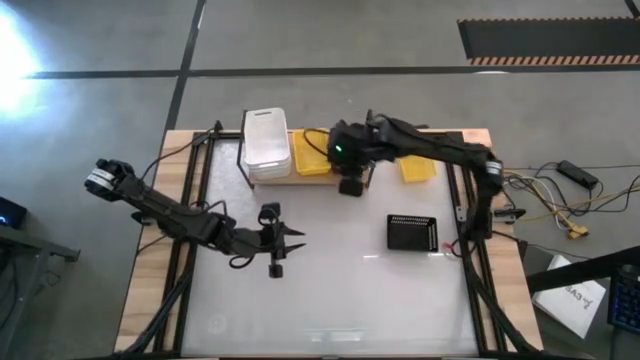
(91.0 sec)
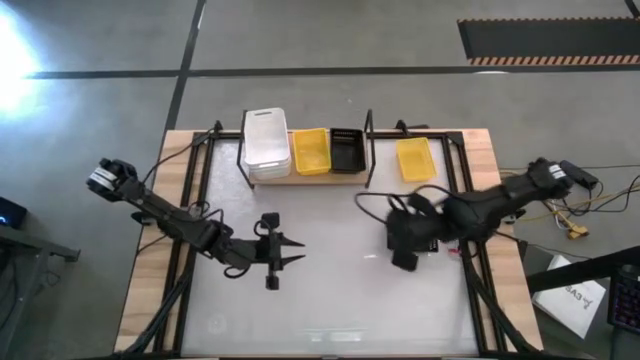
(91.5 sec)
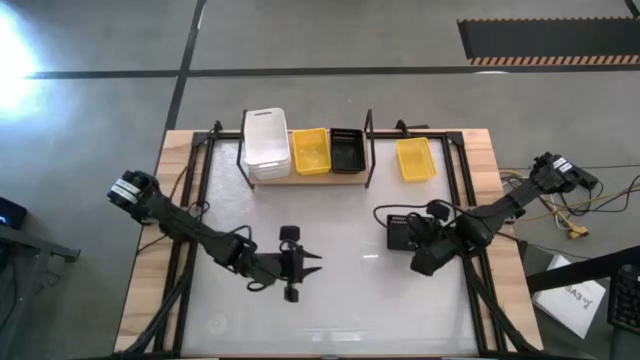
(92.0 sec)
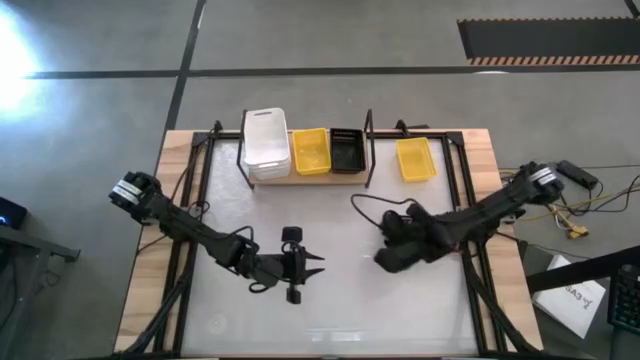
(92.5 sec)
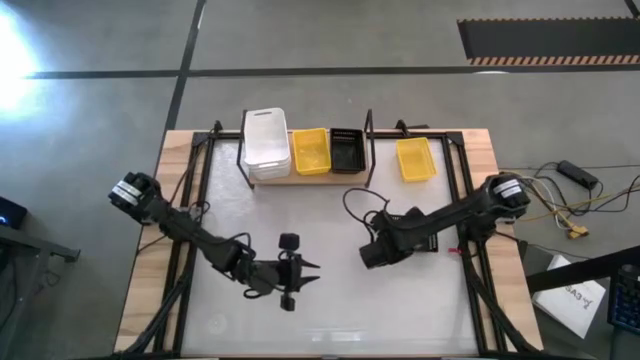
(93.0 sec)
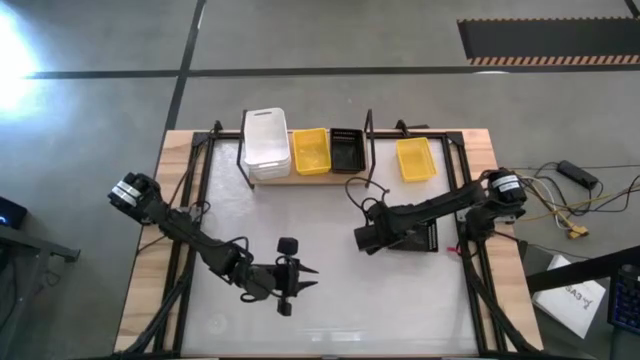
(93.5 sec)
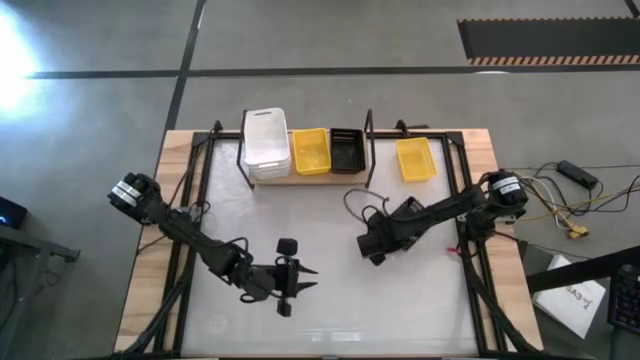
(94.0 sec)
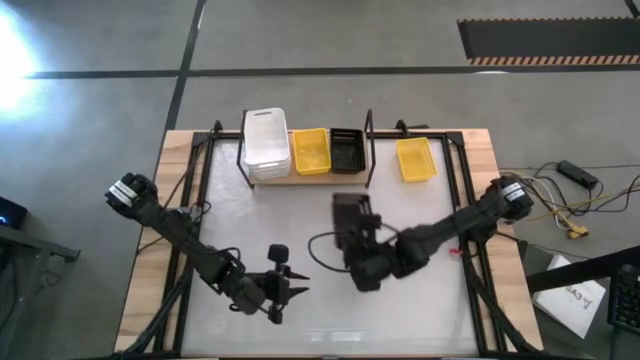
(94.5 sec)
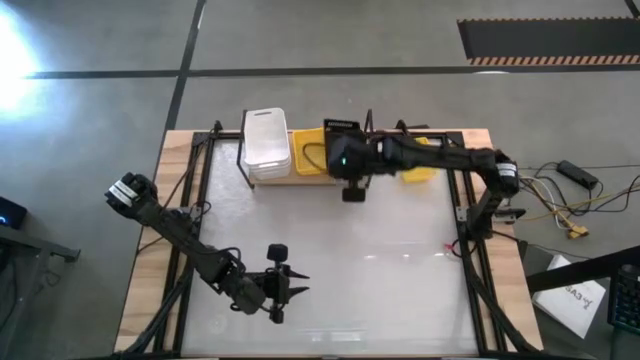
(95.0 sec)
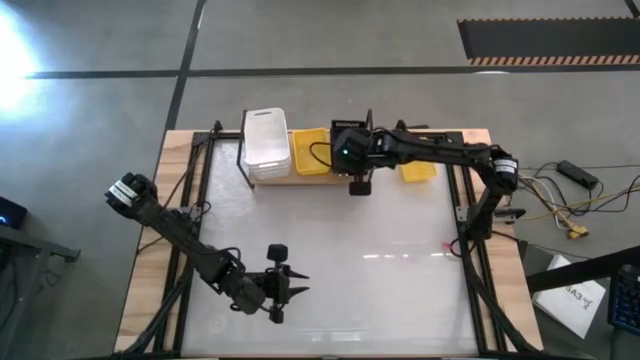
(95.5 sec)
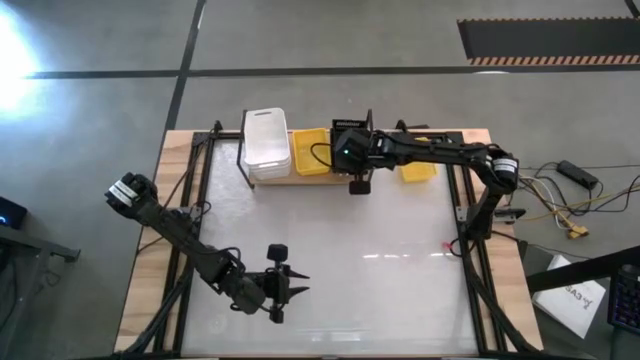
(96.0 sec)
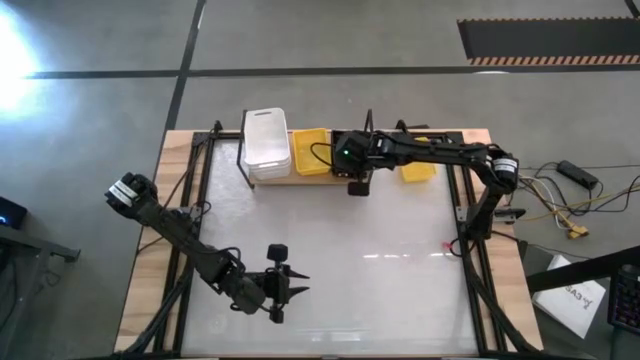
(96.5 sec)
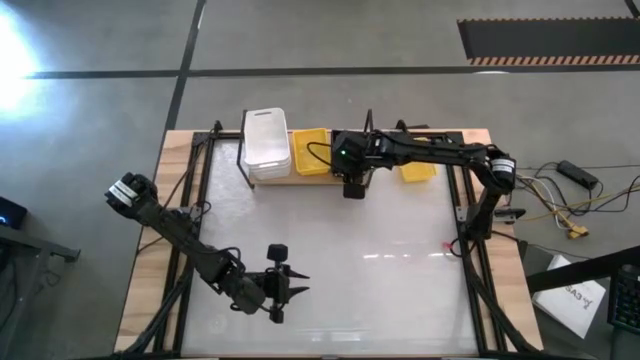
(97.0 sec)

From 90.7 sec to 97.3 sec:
Task: Stack baskets on shelf by color
Stack the black bin on top of the black bin on the shelf

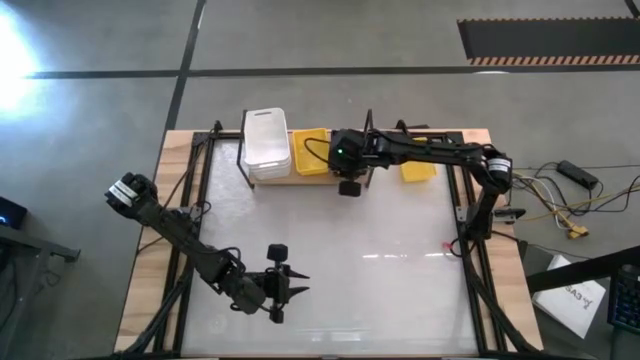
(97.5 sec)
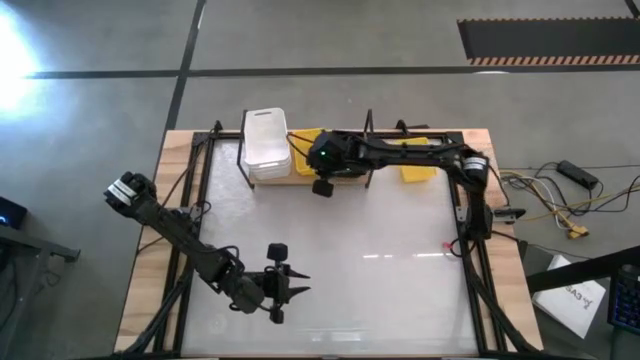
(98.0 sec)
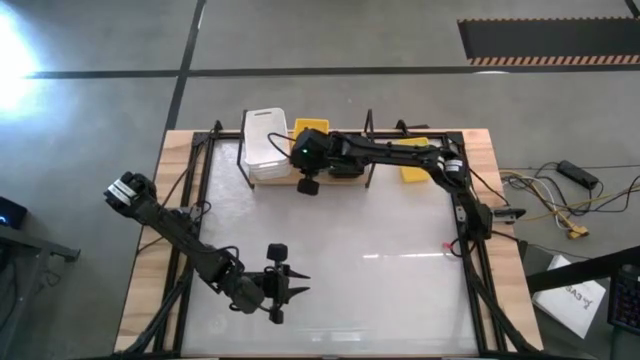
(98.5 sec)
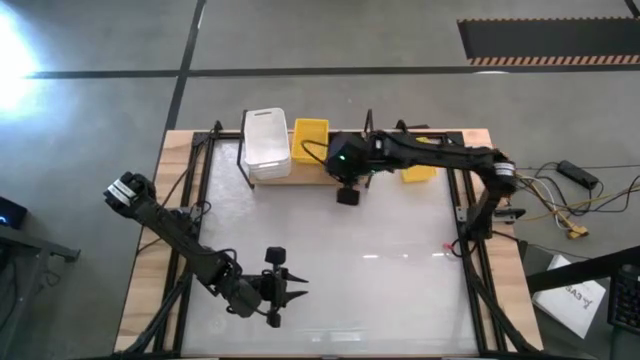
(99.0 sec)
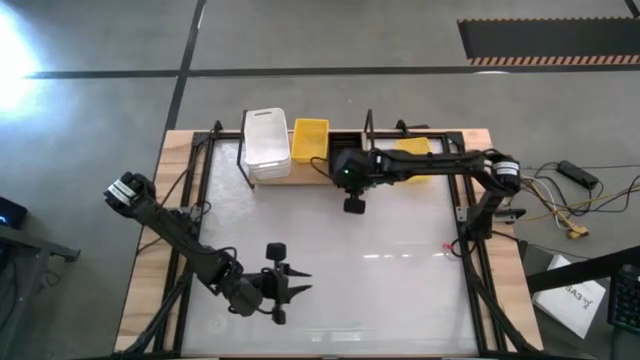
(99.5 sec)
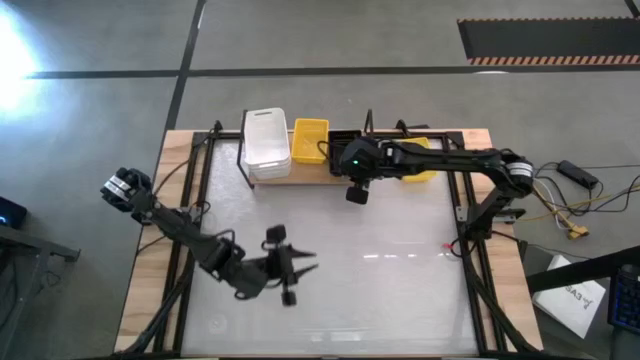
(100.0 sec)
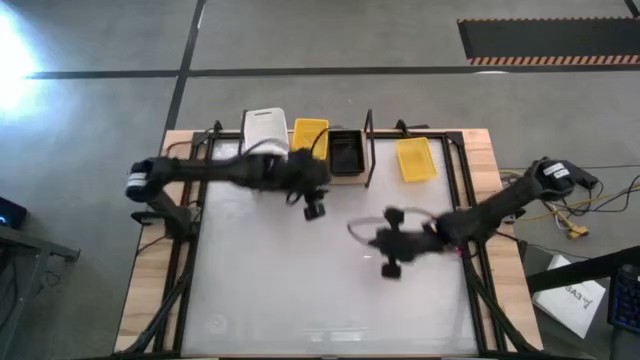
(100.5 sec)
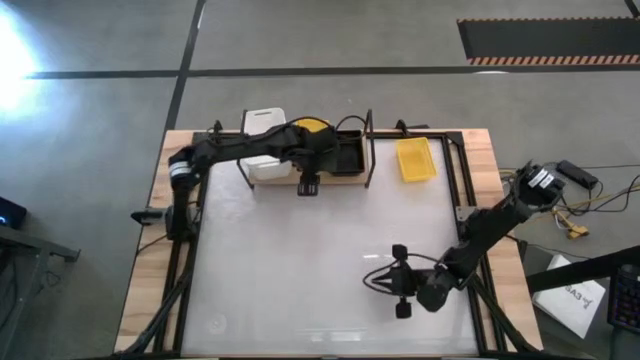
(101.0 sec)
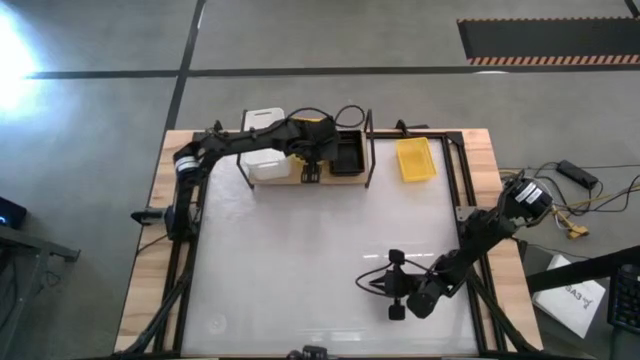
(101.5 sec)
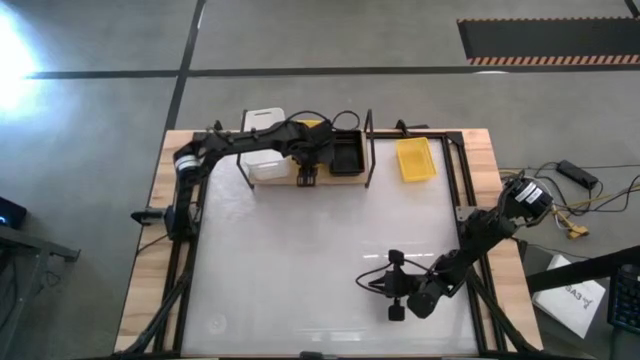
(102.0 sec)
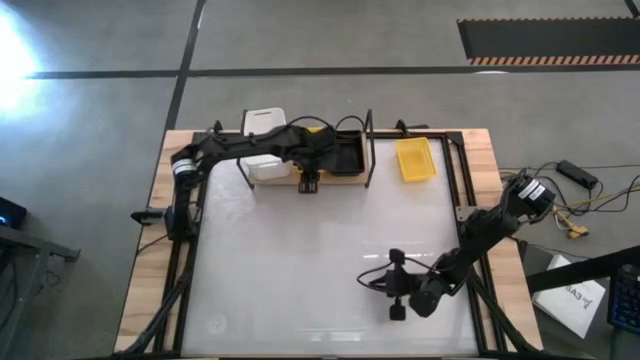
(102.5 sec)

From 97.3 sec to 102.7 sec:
Adjust the stacked yellow bins on the shelf

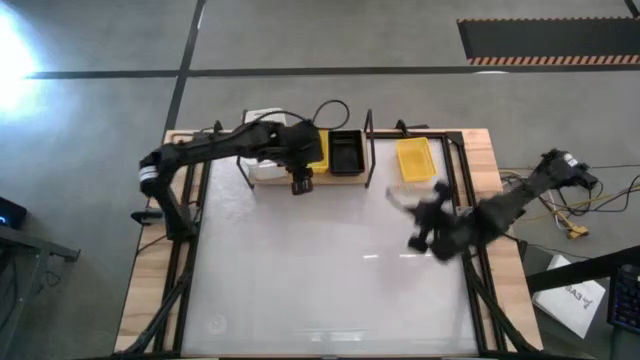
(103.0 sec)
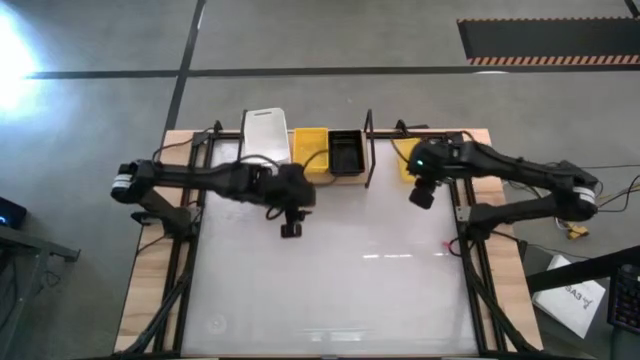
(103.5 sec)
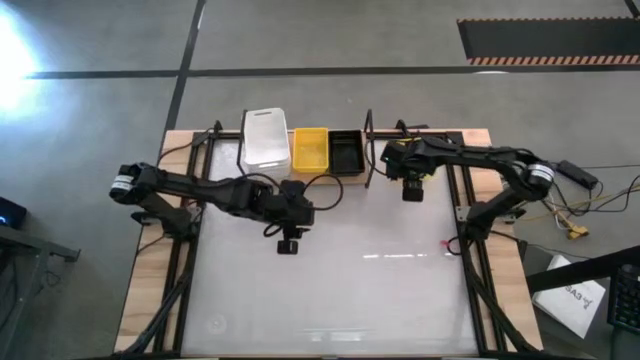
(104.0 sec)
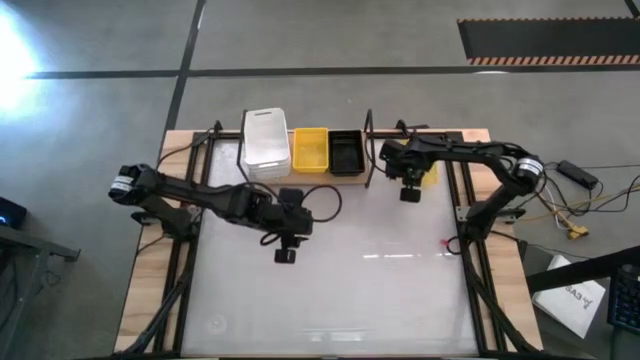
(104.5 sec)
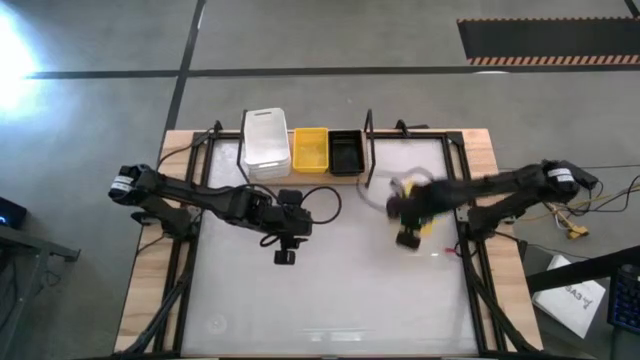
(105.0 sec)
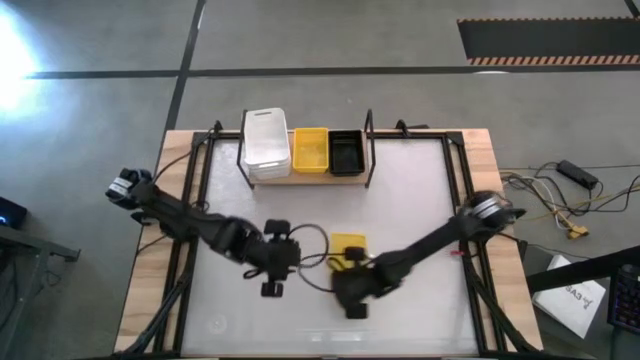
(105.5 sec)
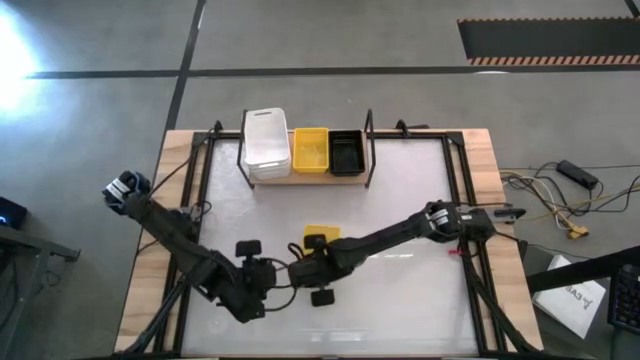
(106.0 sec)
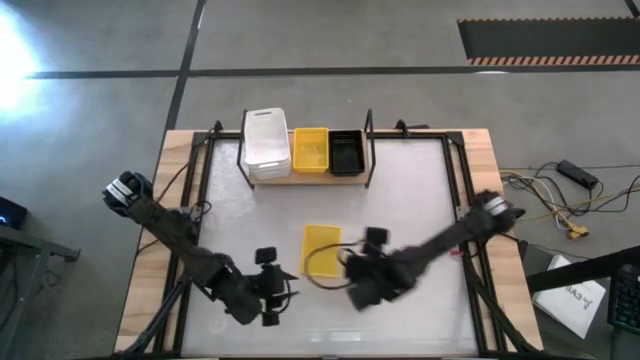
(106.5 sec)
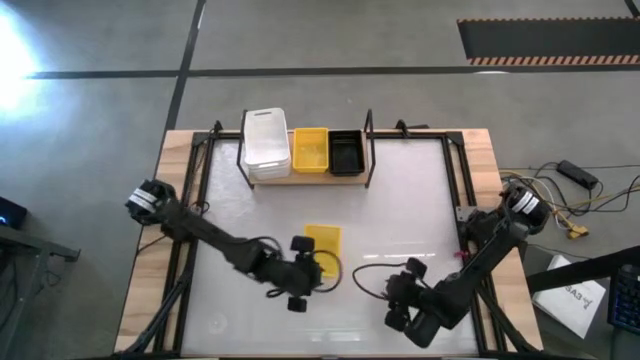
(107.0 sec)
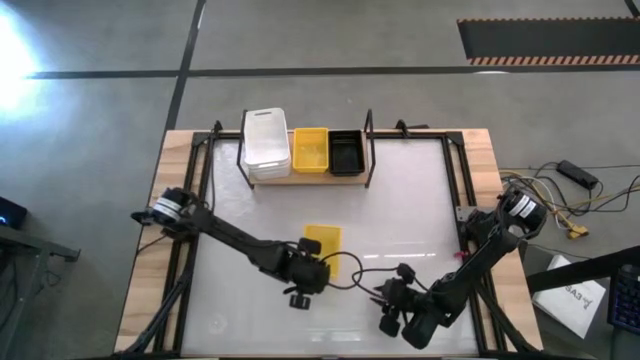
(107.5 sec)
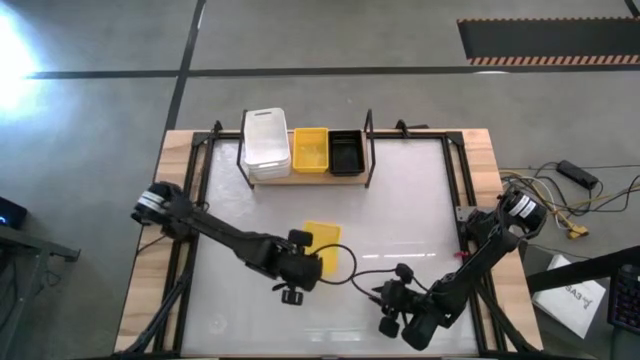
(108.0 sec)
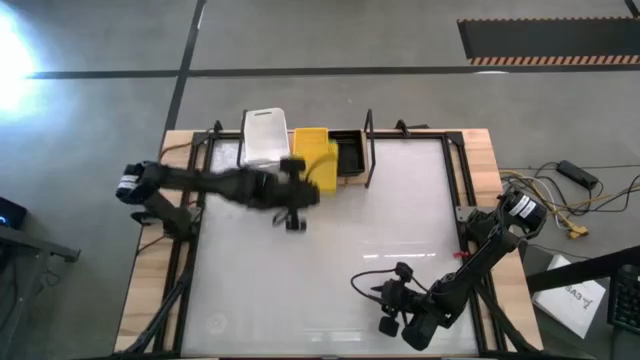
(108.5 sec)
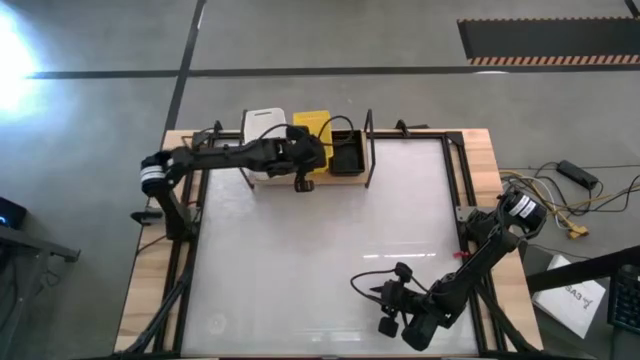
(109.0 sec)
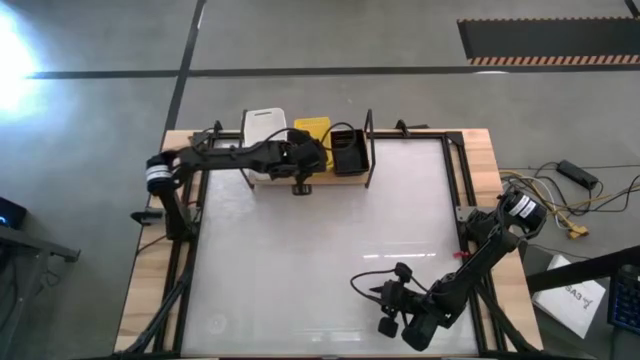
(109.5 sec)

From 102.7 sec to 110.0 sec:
Stack the yellow bin on top of the yellow bin on the shelf
